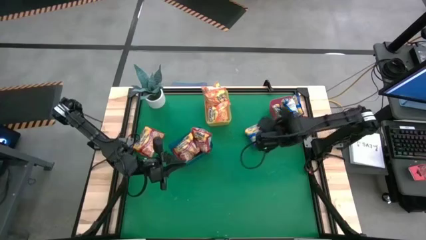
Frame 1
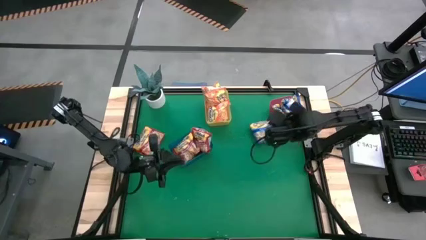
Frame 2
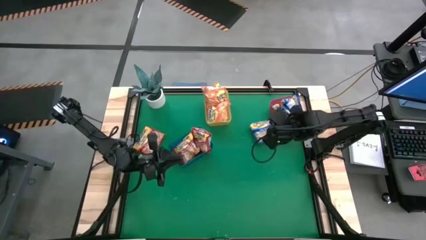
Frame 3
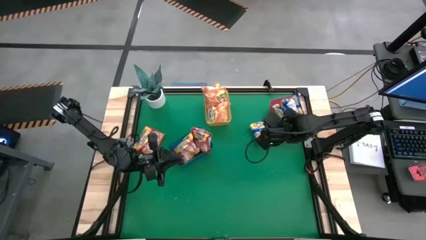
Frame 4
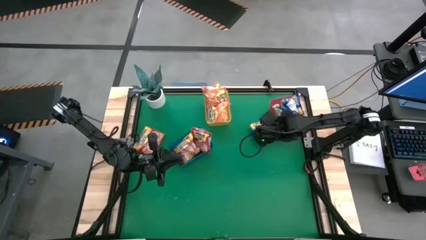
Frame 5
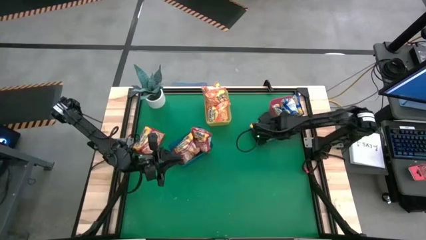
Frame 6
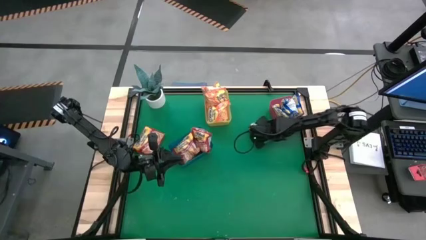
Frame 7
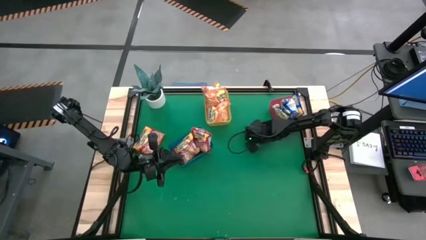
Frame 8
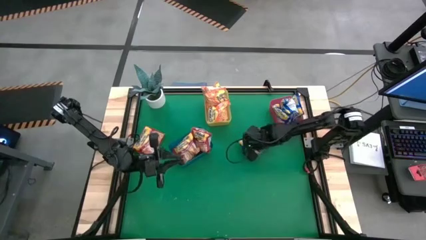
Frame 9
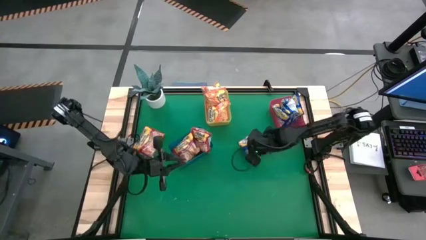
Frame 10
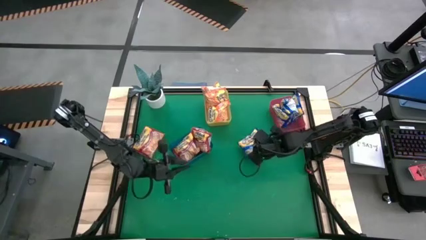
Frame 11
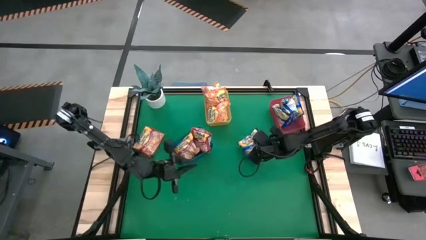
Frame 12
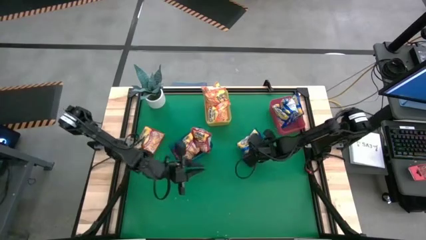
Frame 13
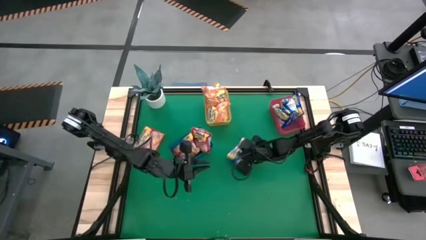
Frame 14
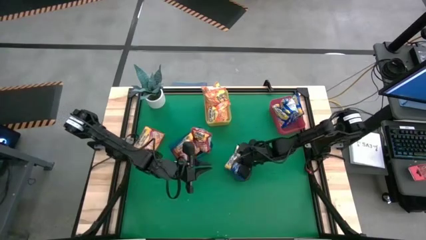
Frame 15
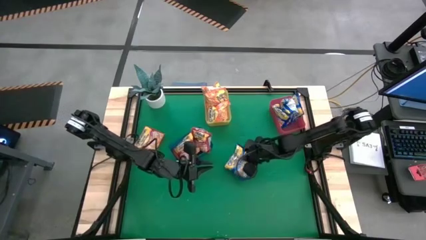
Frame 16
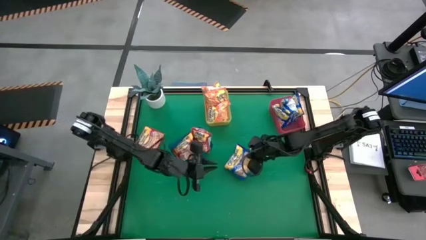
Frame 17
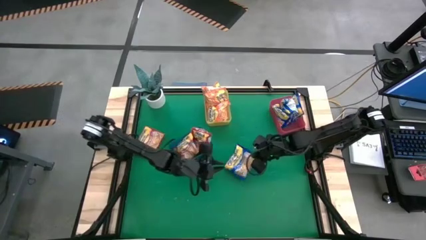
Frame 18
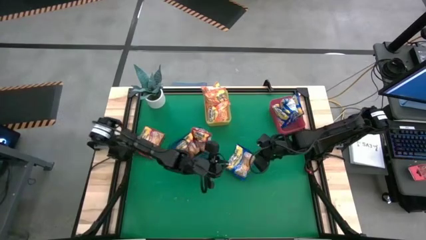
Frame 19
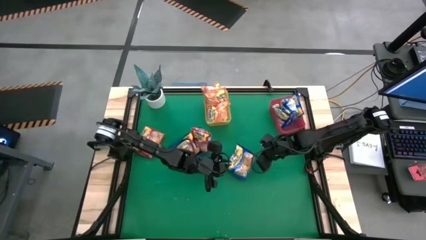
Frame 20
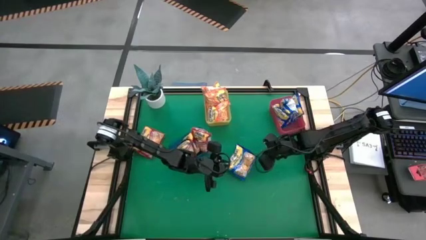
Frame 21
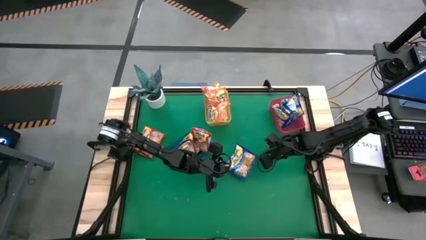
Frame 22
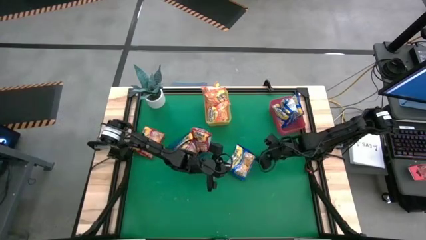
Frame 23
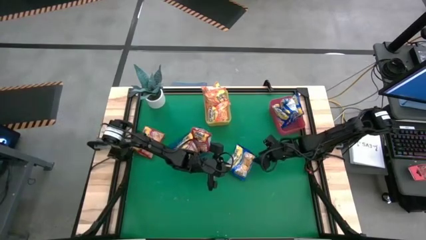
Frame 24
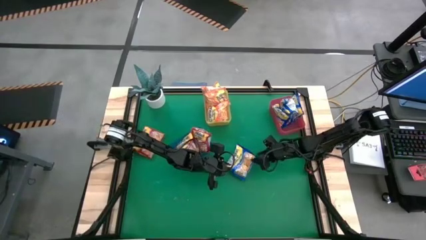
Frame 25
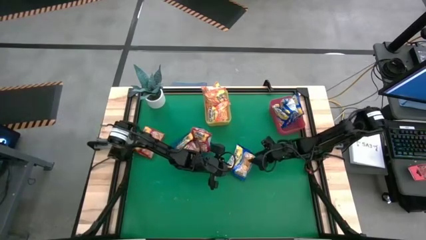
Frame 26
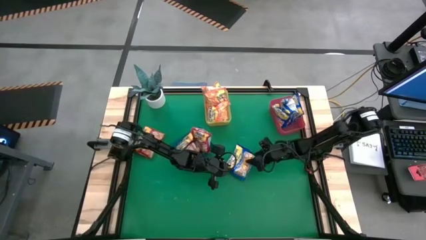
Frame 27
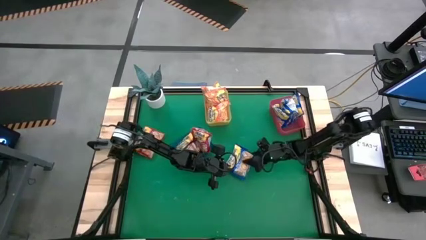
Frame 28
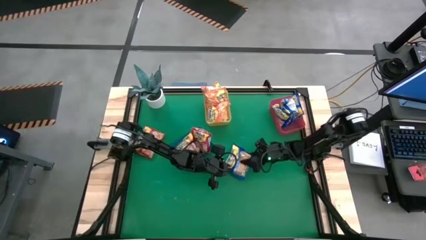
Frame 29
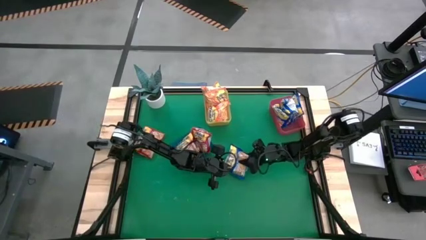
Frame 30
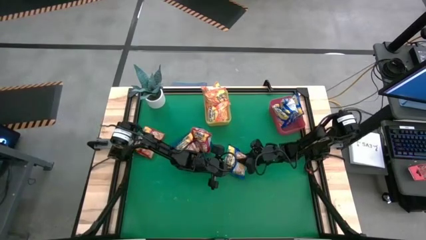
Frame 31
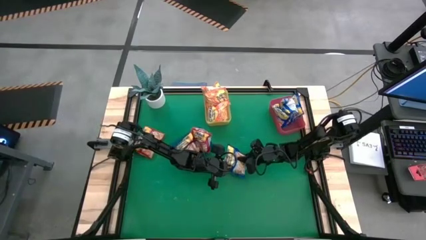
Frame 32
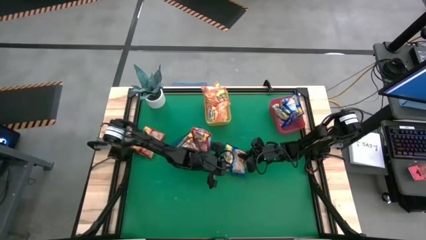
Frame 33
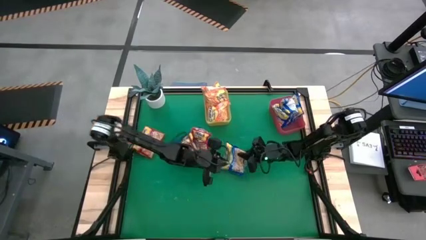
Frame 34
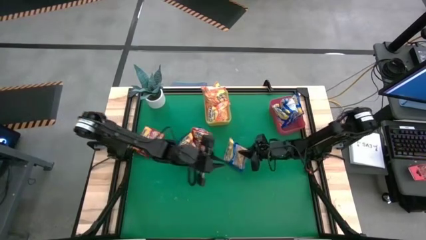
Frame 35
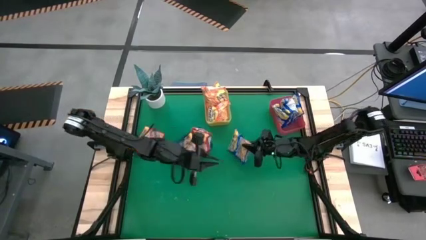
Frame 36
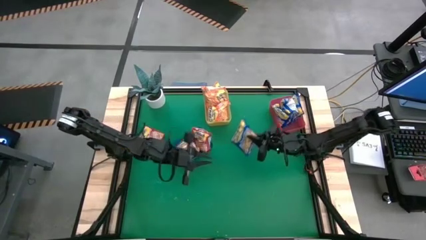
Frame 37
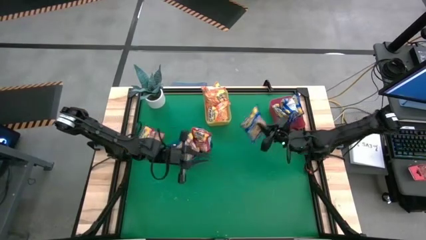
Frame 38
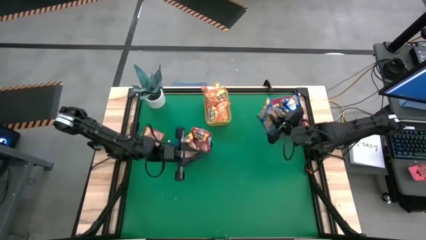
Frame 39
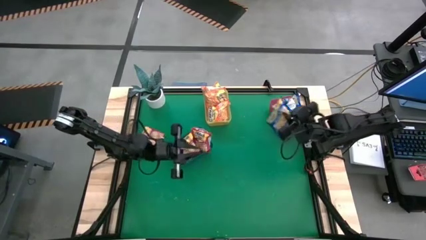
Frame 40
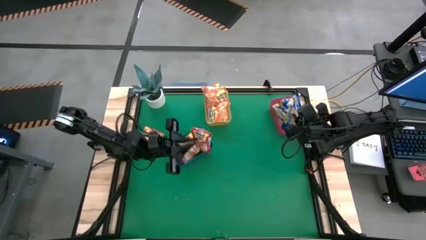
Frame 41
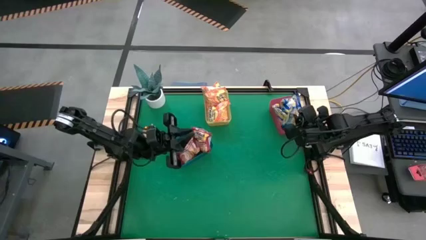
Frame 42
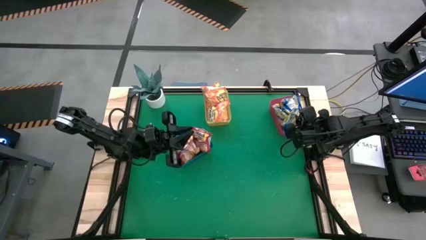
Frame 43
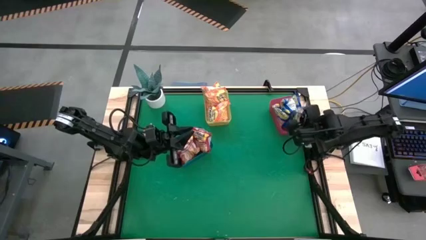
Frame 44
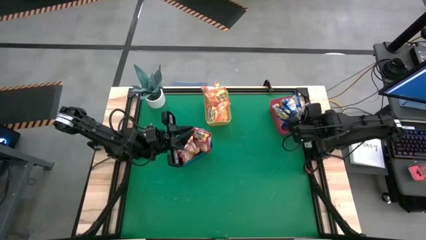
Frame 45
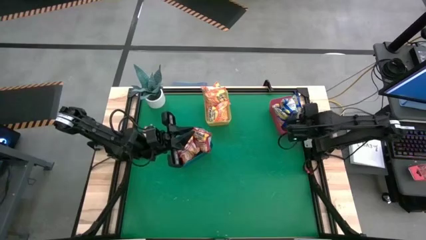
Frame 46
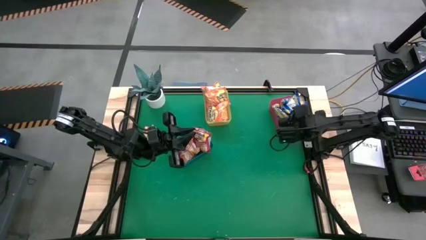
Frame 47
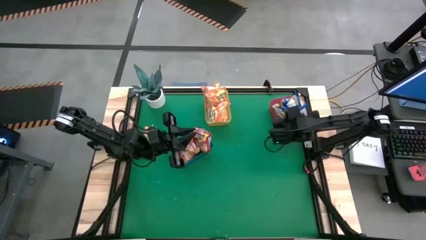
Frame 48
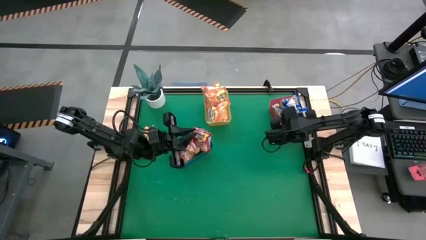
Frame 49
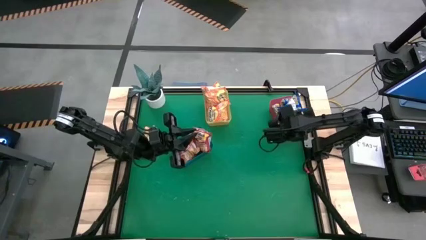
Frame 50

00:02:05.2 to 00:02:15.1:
Task: Sort Maruchan noodles
Put the blue noodle pack into the red bin

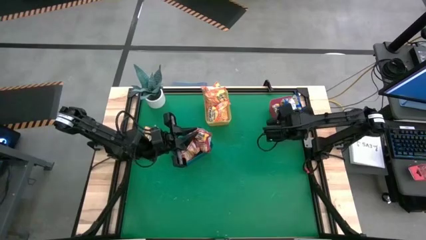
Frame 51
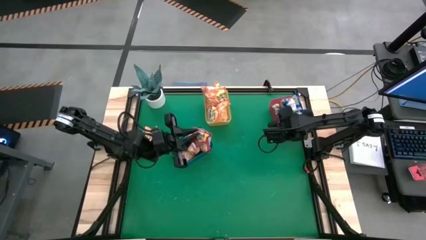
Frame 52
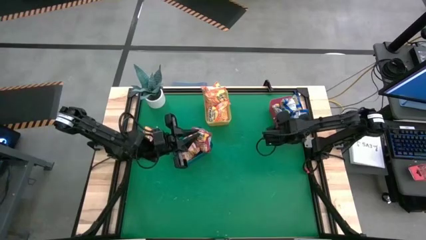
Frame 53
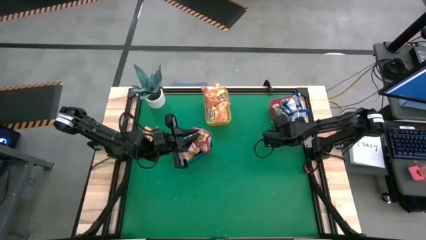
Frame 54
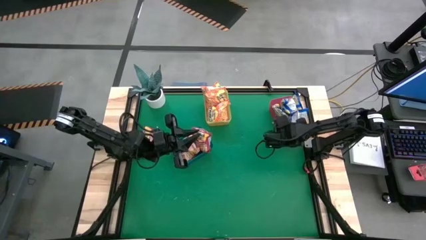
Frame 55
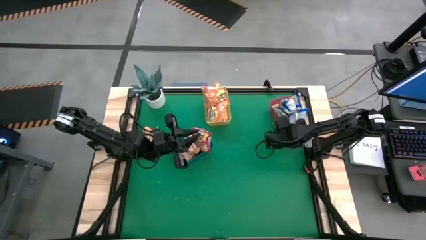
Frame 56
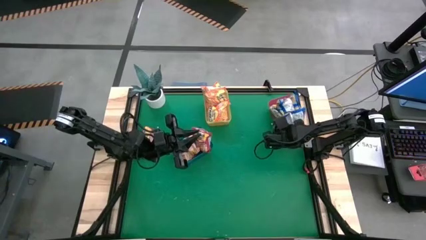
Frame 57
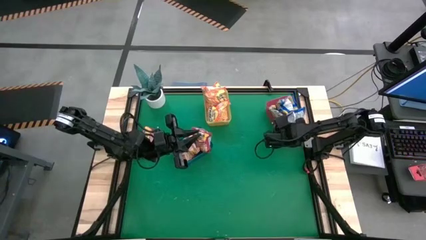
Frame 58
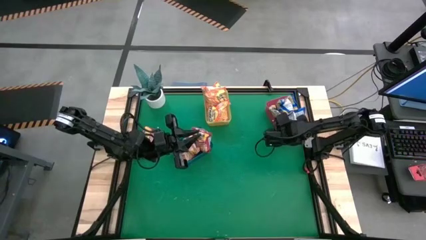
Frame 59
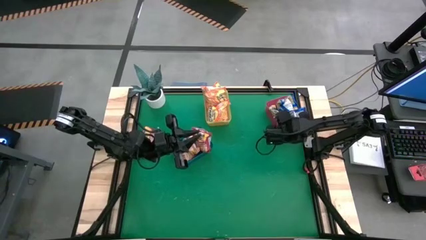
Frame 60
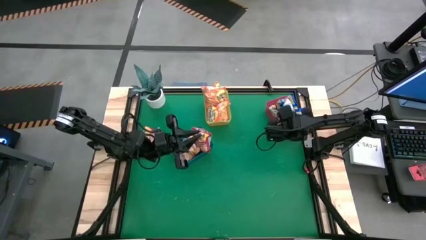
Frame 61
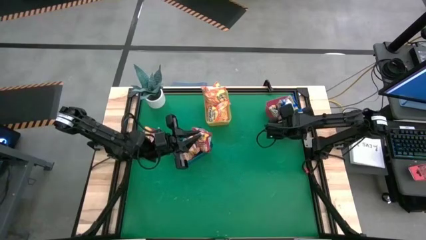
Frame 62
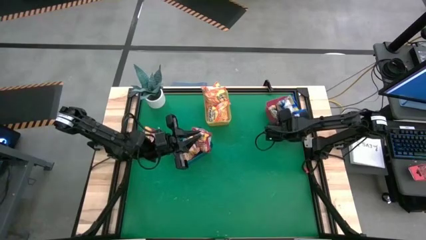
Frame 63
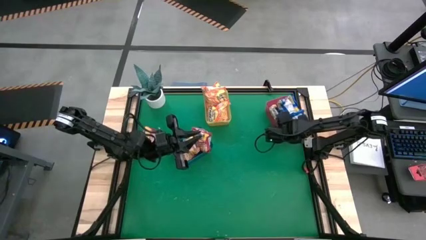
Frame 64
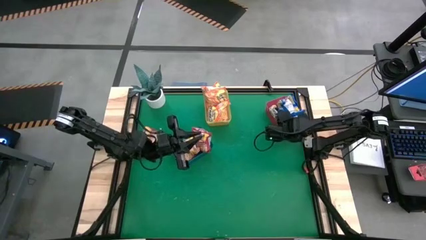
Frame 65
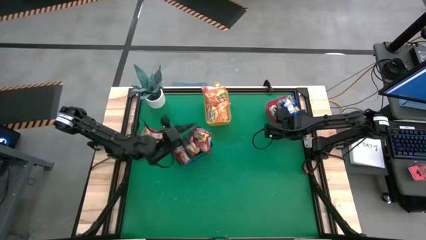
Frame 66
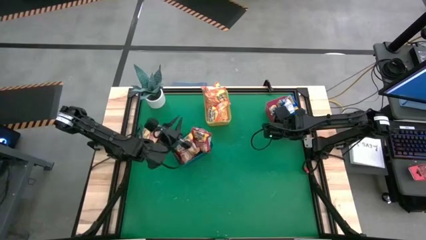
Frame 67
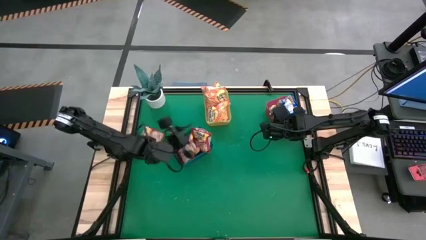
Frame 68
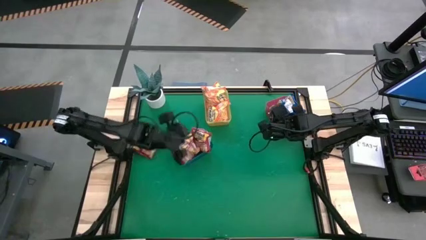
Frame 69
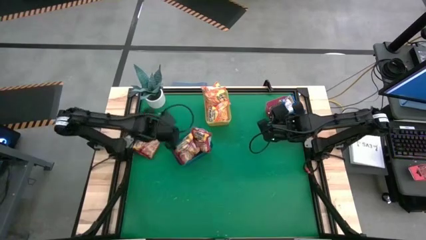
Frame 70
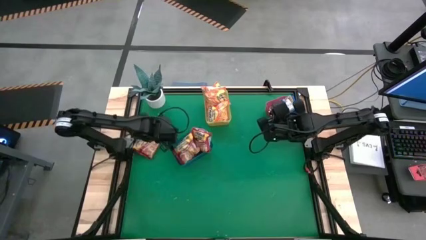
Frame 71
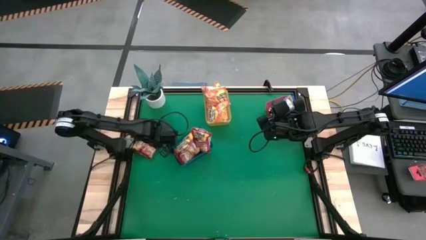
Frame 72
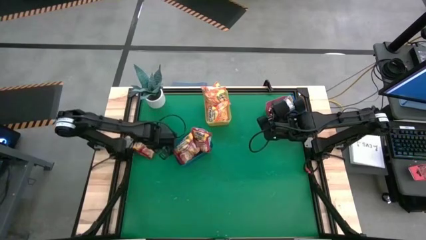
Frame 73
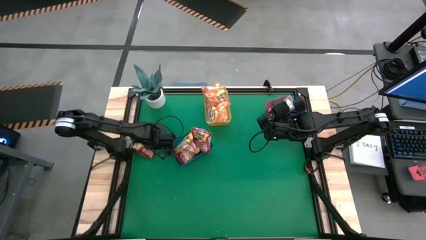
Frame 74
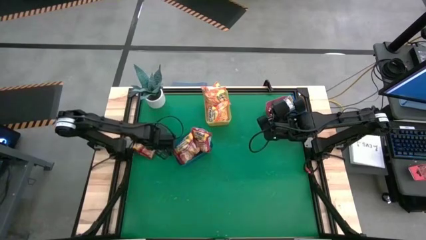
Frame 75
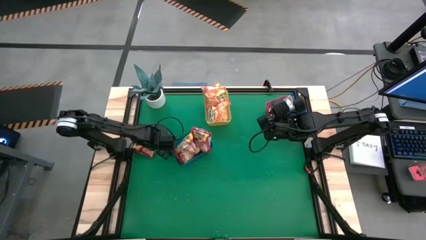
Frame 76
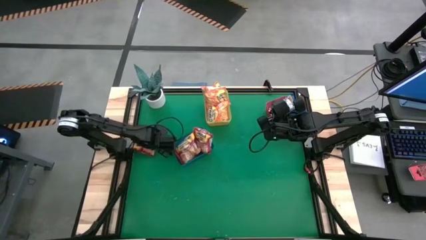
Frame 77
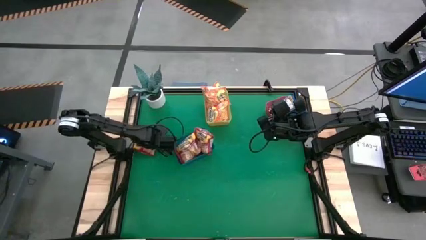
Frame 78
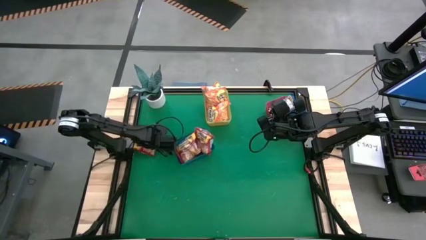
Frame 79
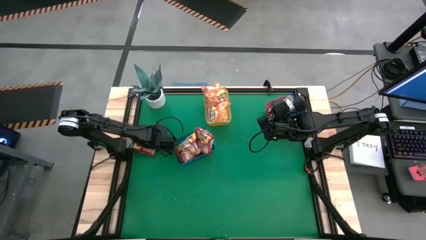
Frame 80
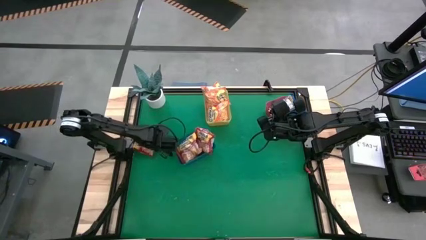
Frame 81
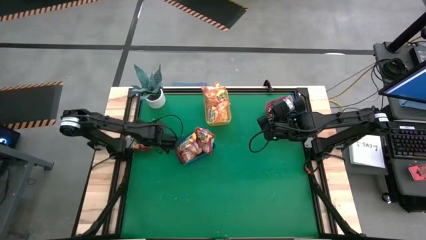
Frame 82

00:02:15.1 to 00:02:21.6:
Put the red noodle pack into the blue bin
